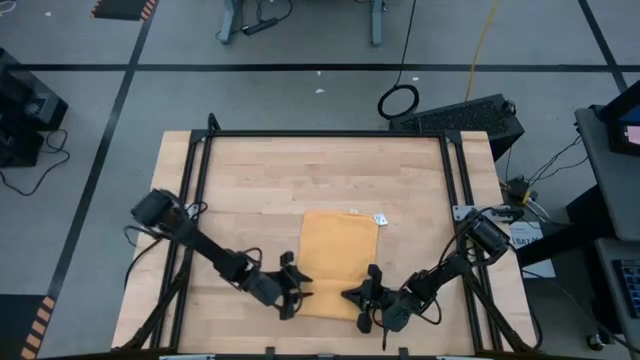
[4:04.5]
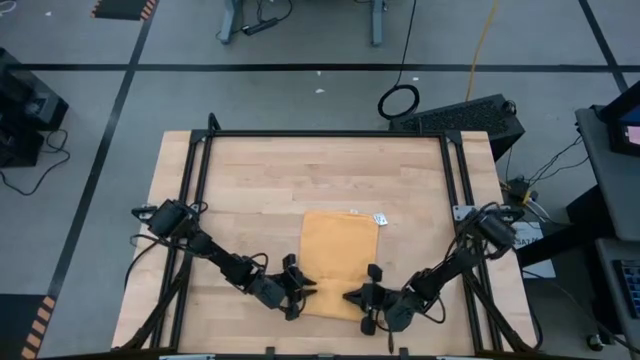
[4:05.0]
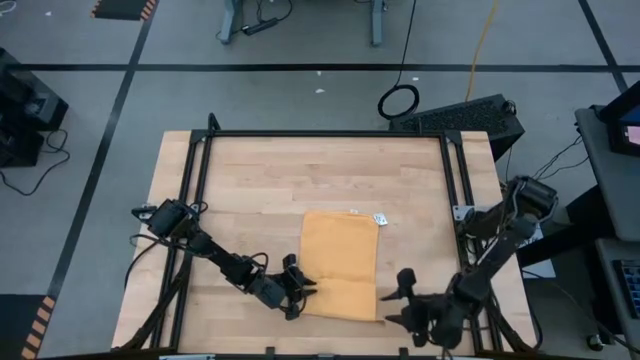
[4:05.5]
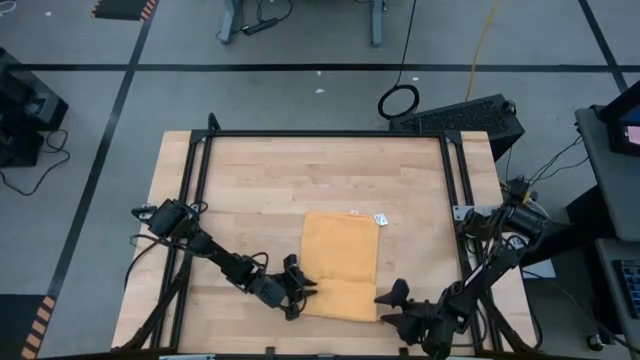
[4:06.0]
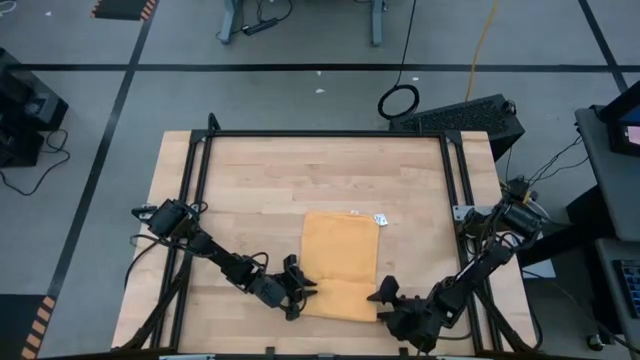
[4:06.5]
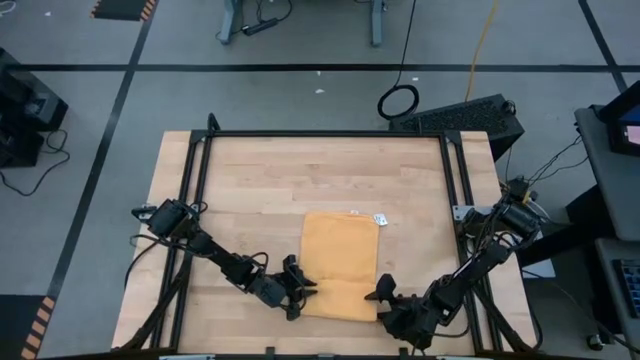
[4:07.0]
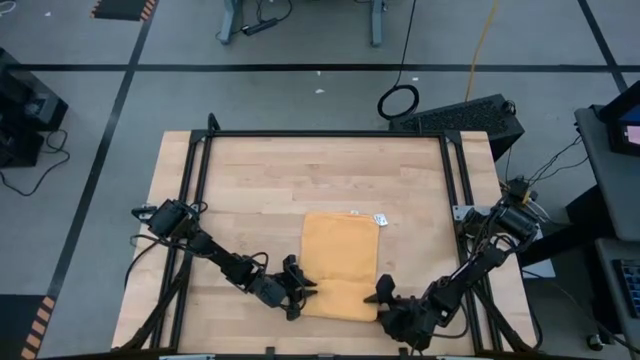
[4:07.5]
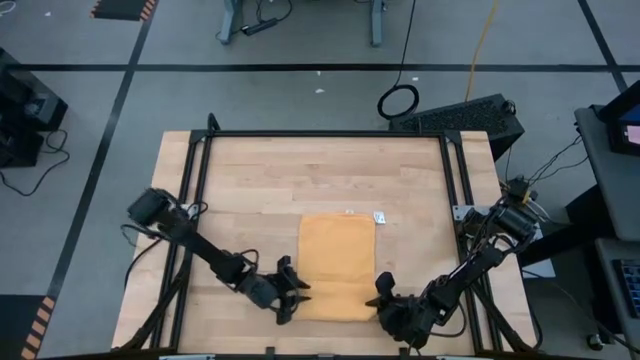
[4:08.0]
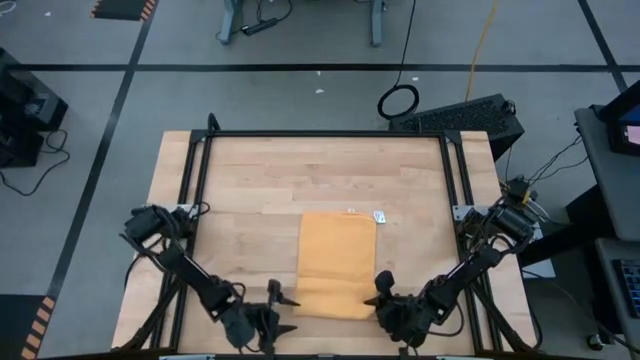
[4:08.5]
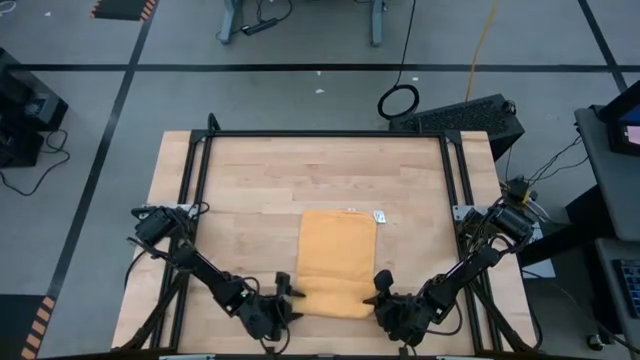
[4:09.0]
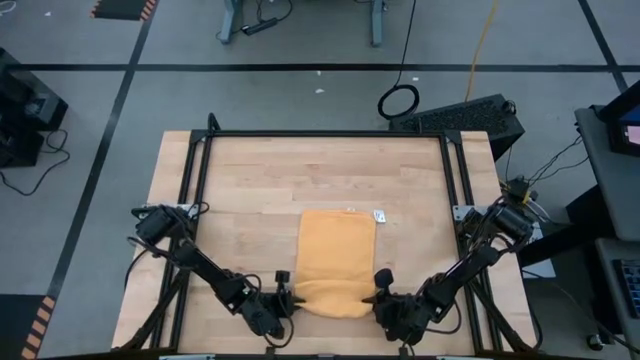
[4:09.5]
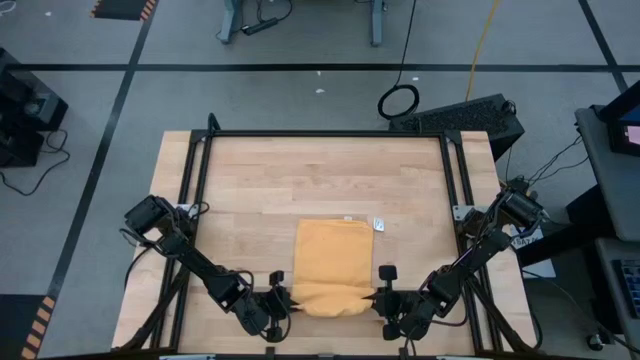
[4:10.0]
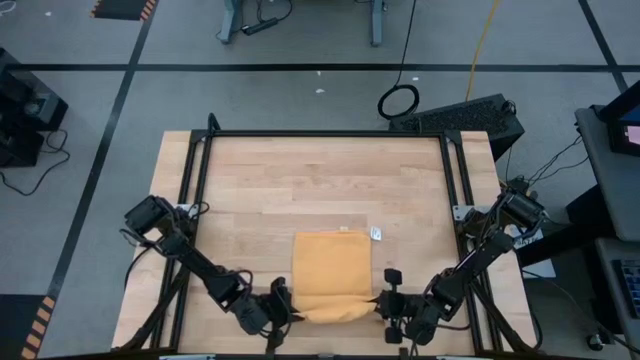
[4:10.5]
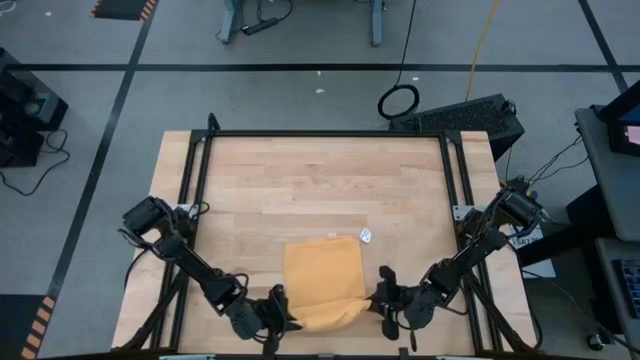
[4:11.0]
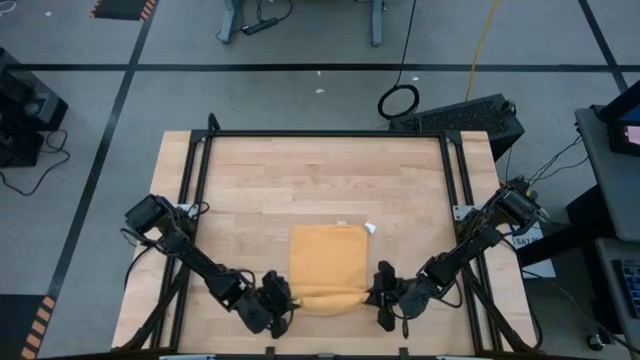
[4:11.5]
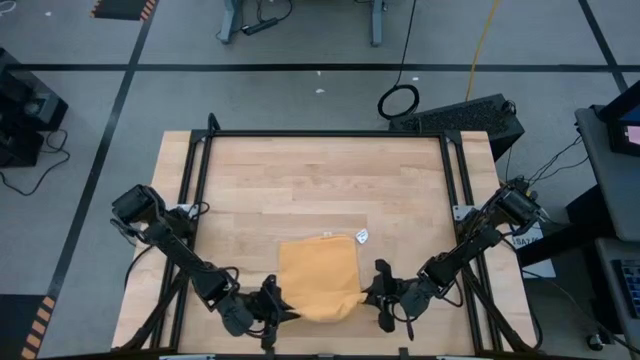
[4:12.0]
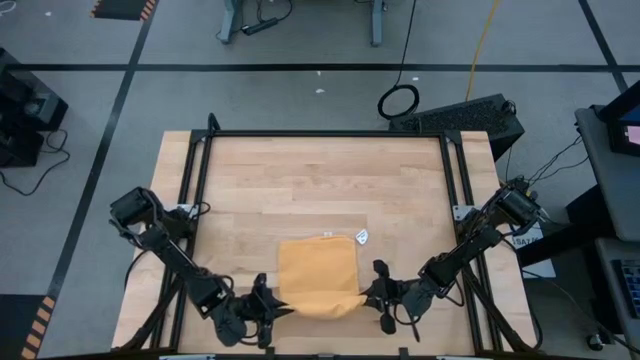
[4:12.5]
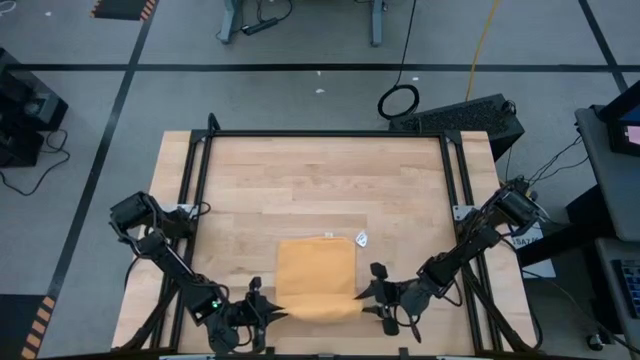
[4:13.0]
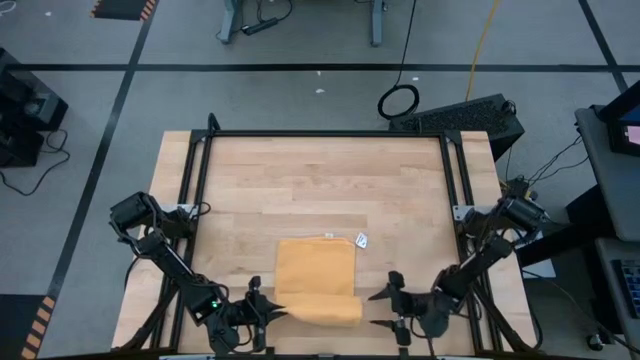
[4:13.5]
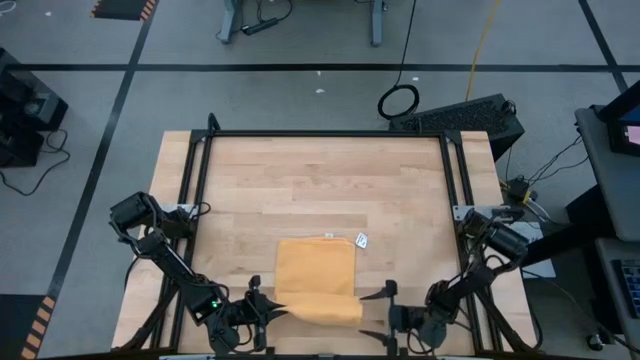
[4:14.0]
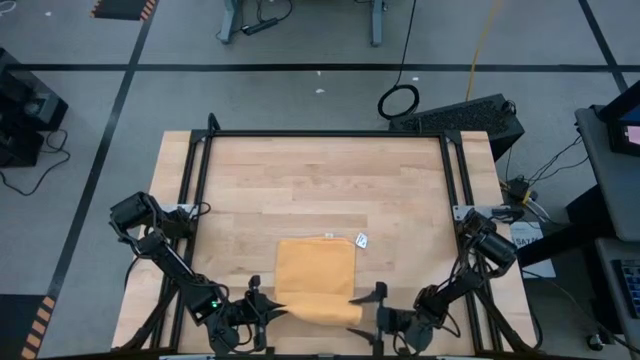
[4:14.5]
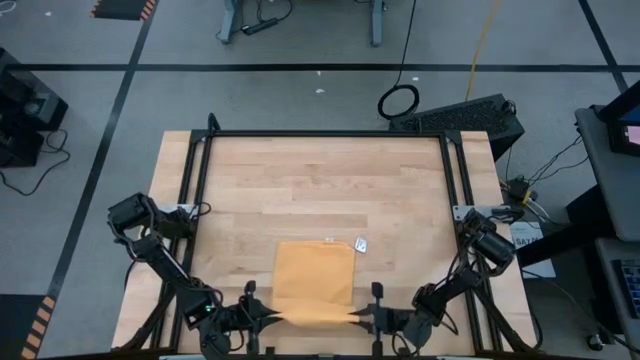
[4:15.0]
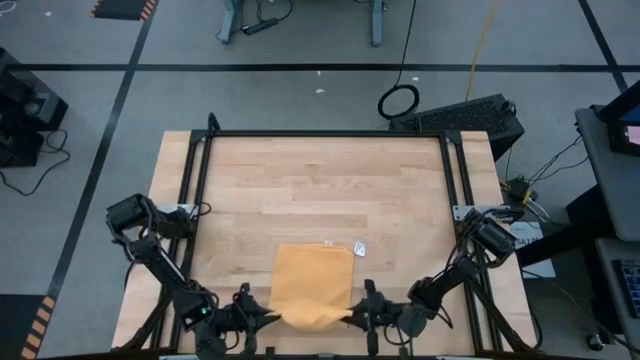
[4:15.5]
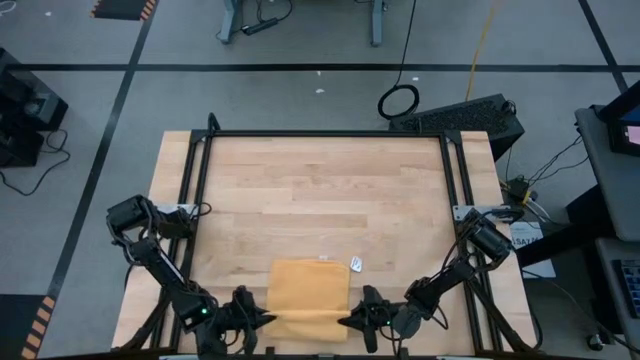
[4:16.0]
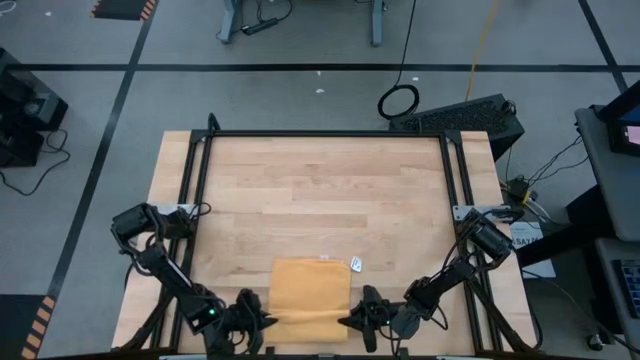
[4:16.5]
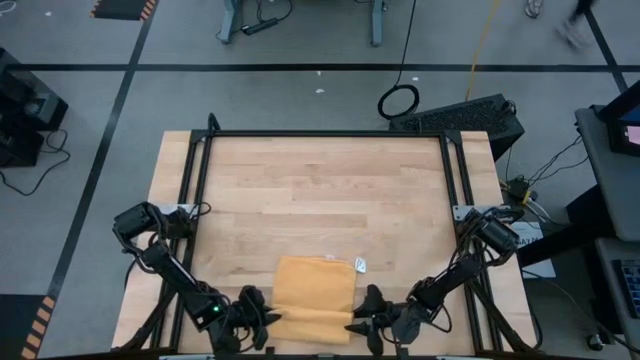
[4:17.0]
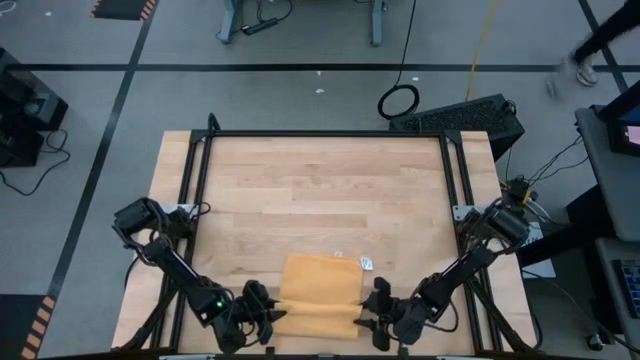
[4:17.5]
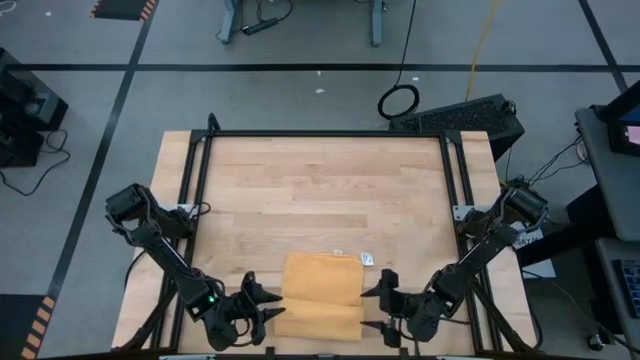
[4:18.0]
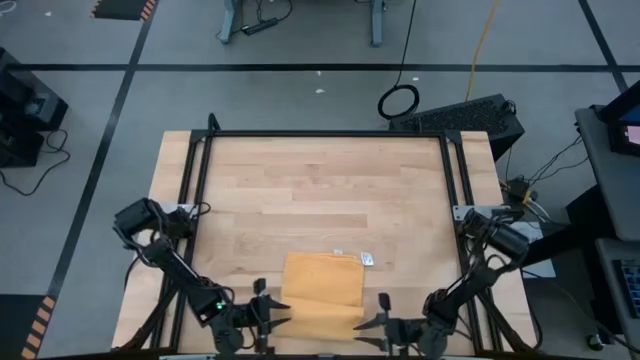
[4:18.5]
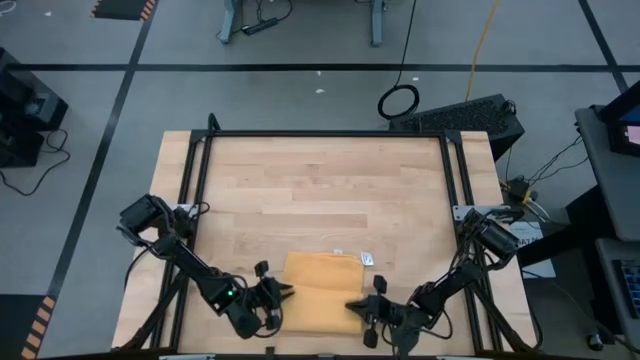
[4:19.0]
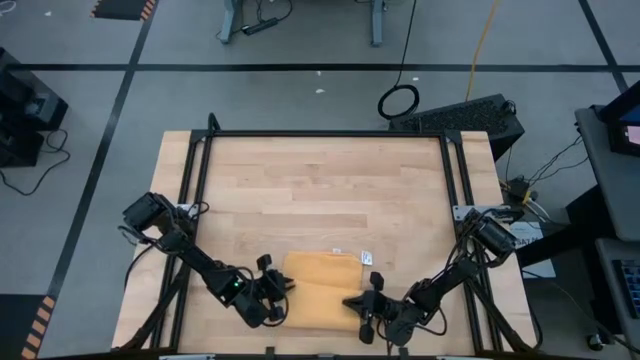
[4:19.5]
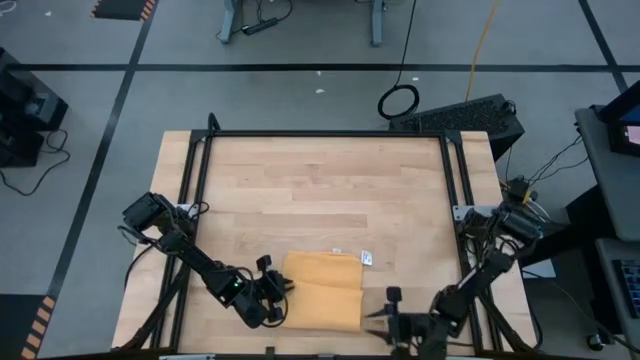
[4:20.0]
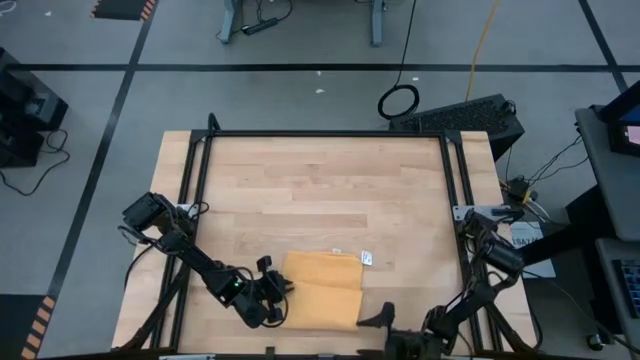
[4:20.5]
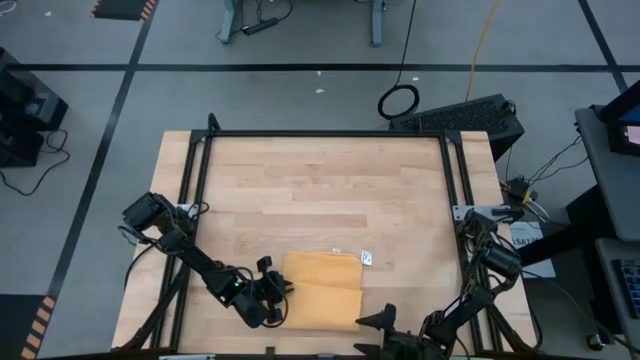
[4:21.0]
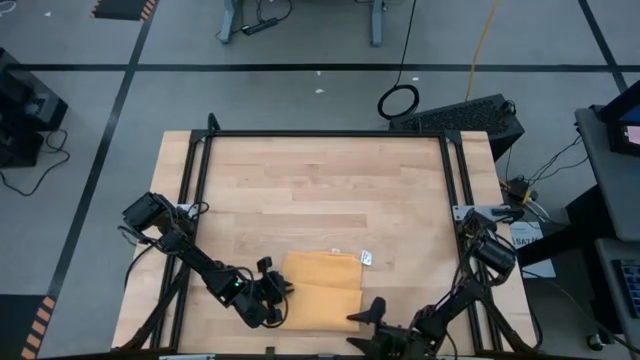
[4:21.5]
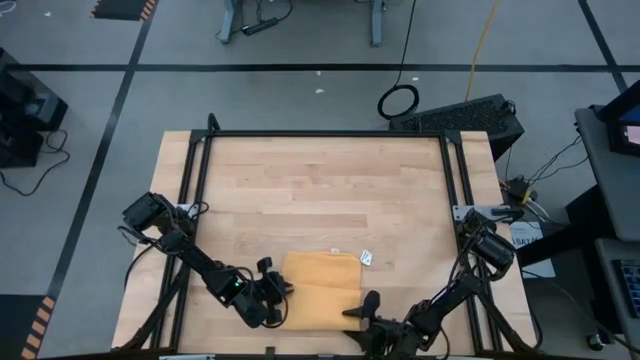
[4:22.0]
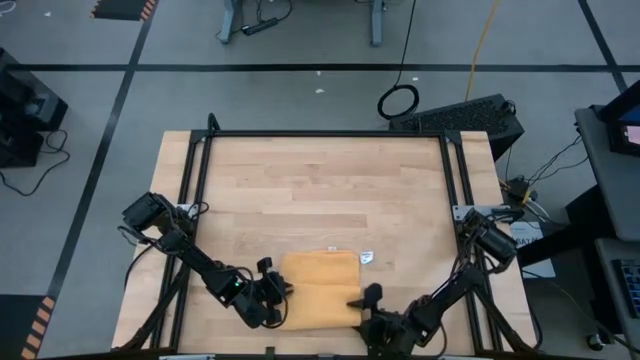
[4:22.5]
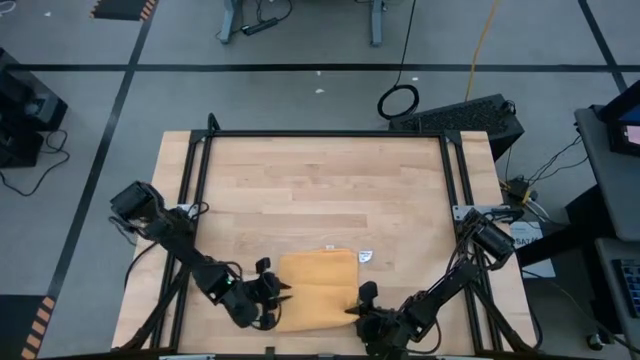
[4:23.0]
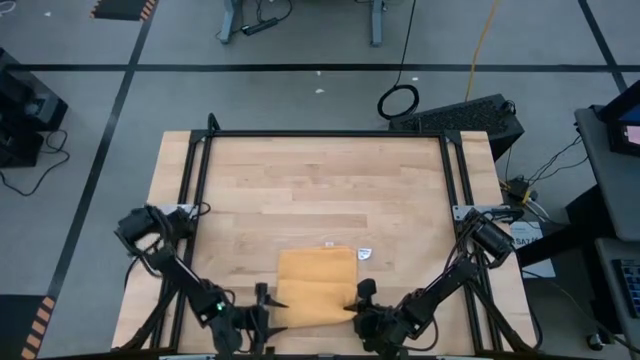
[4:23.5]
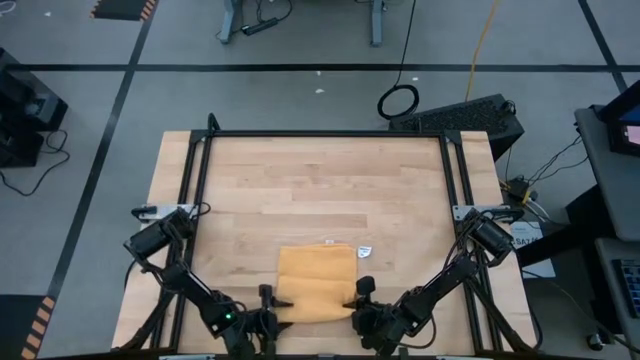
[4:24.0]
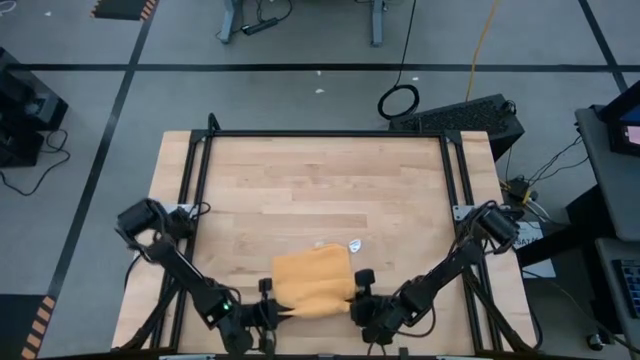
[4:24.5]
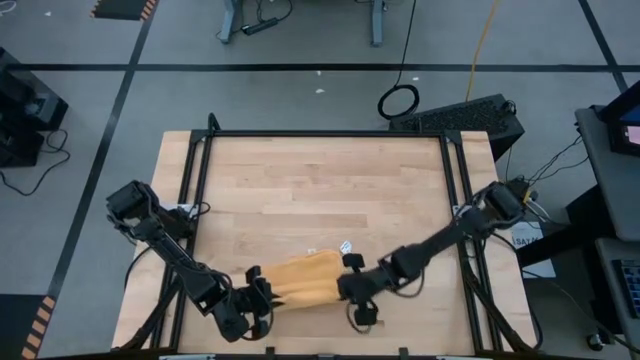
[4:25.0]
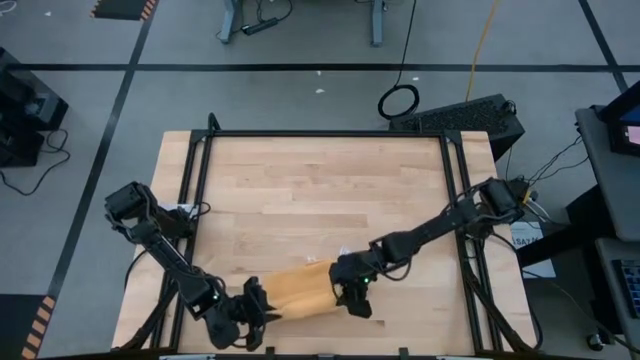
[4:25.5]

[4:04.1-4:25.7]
Task: Roll towel
Roll the yellow towel
